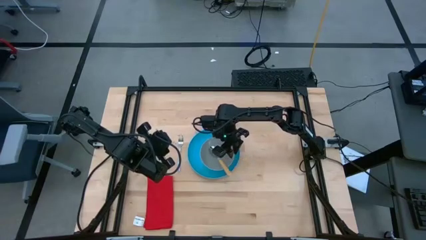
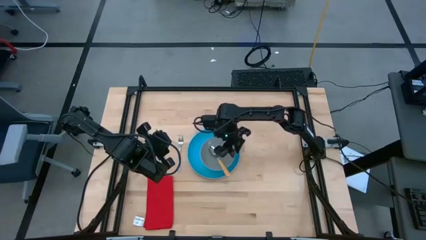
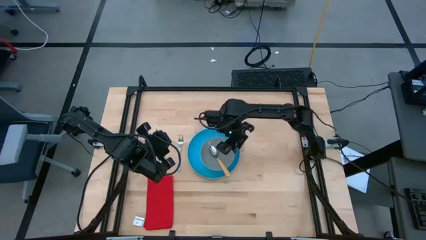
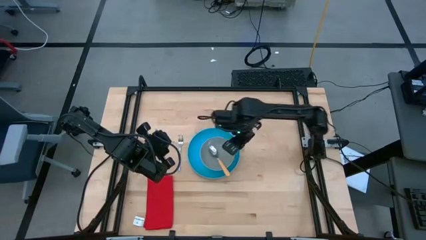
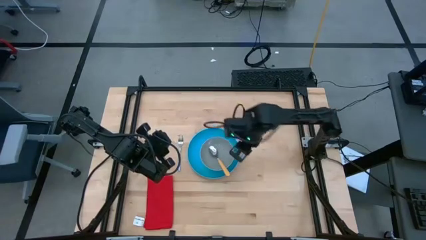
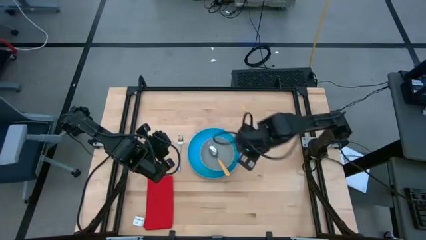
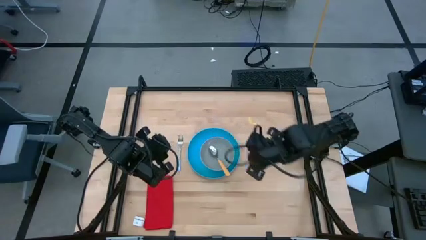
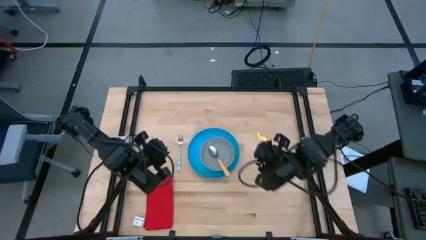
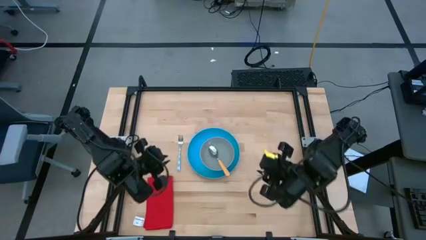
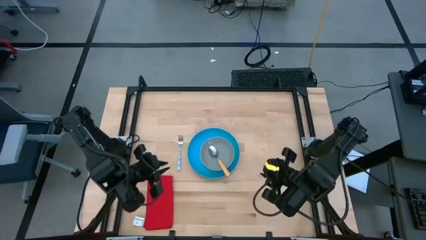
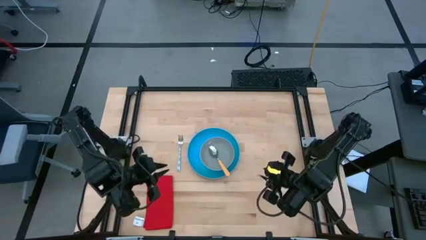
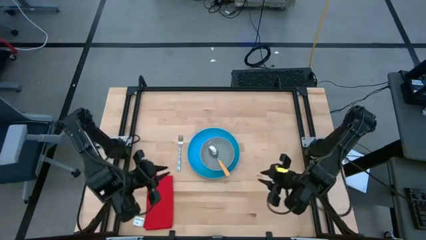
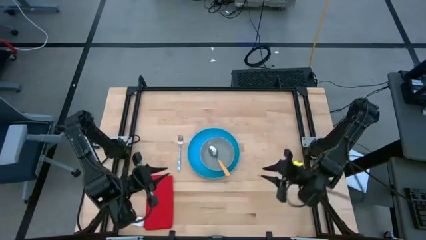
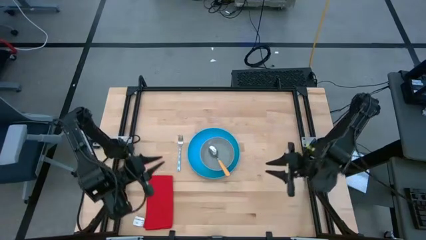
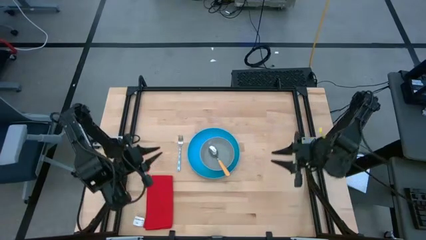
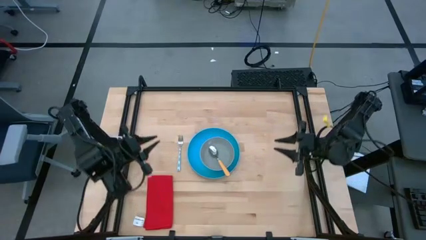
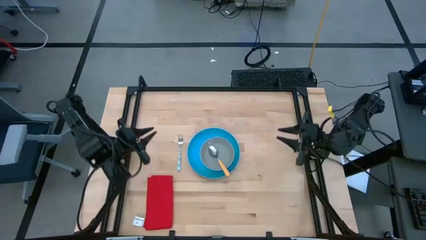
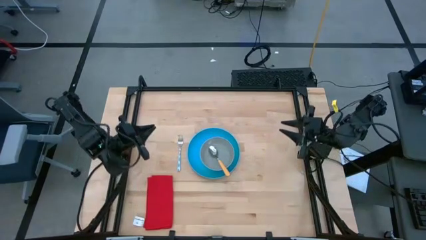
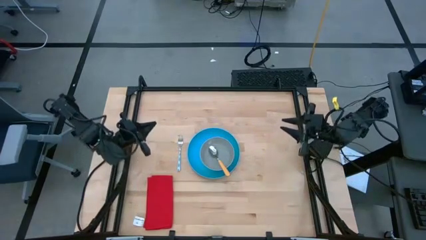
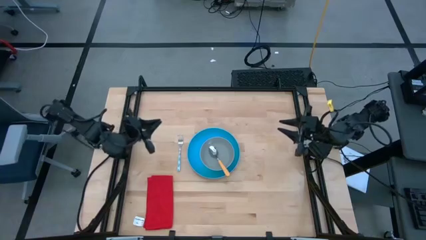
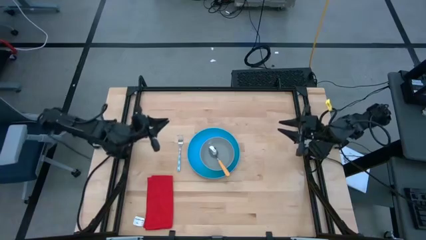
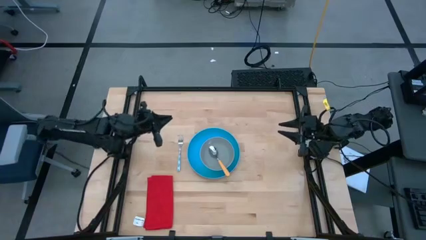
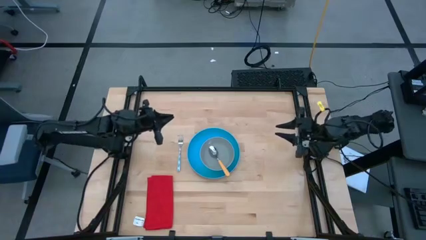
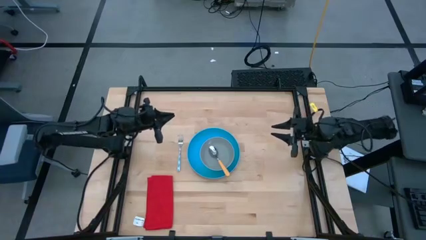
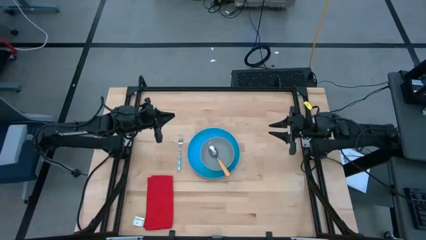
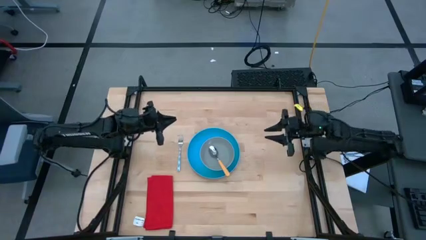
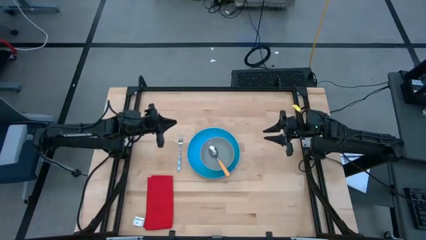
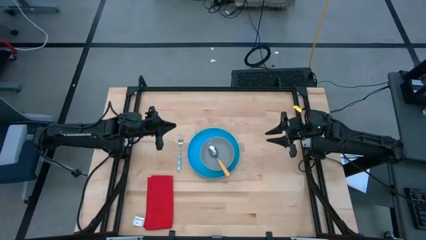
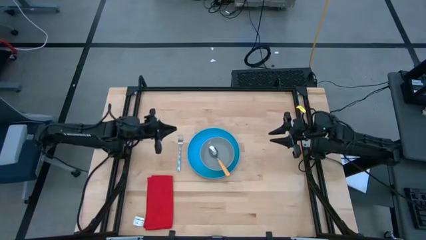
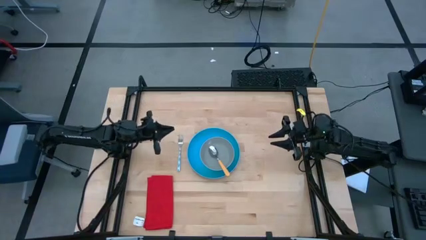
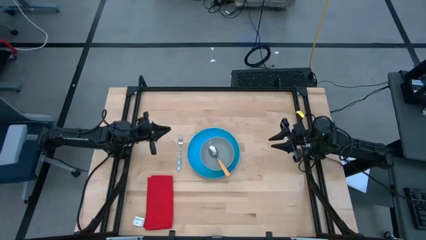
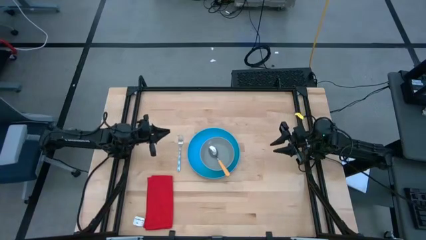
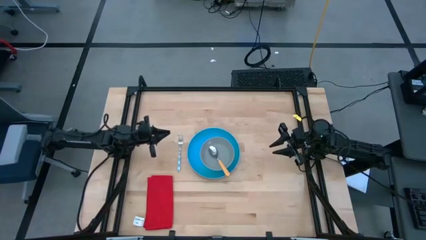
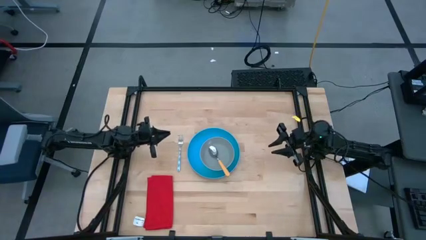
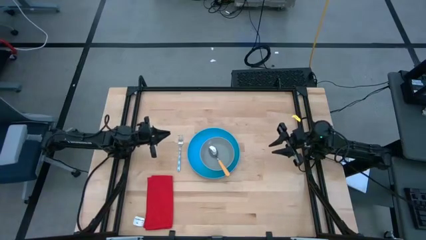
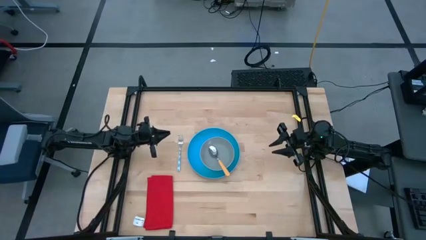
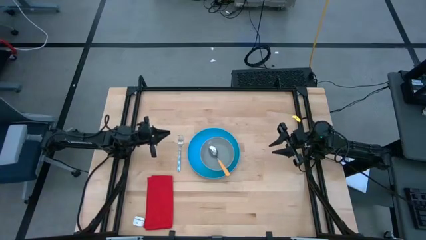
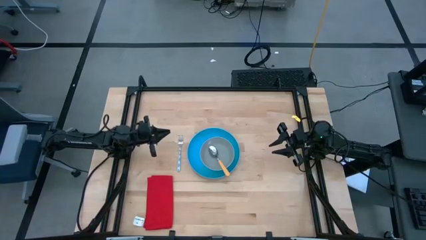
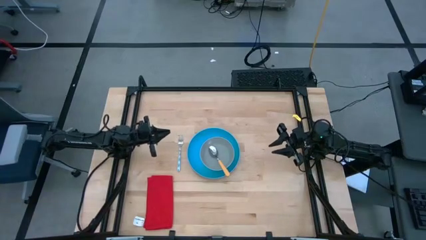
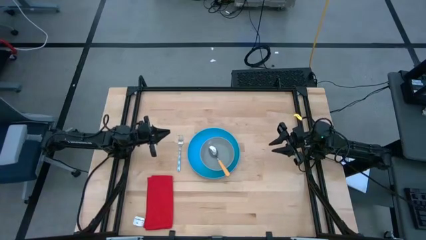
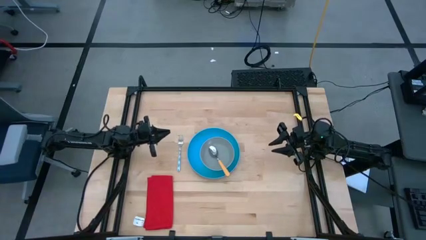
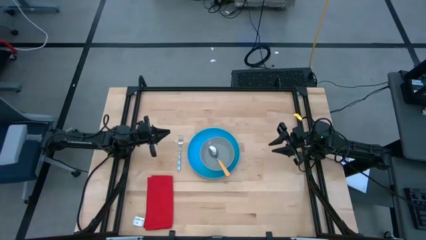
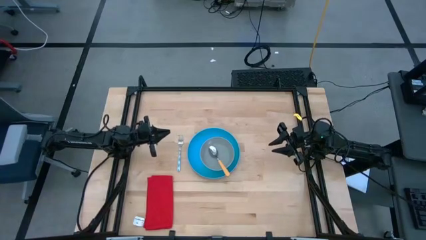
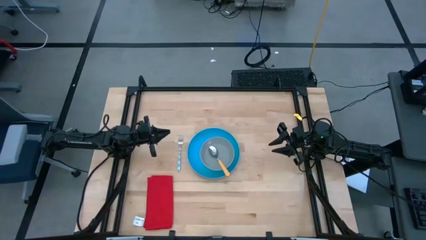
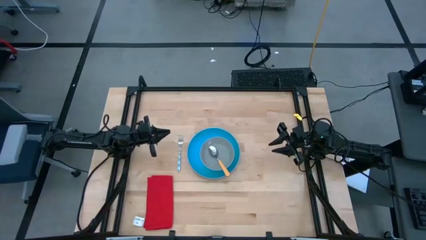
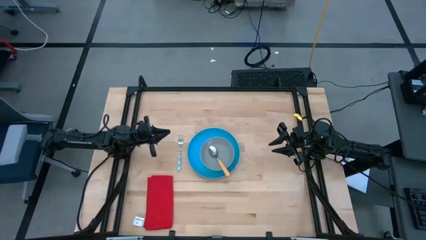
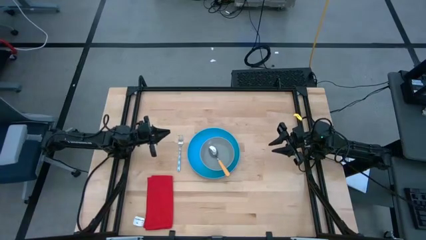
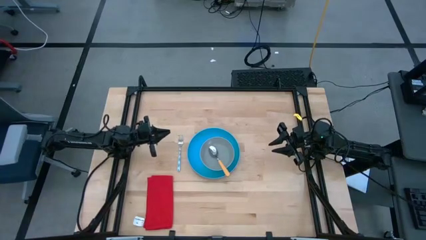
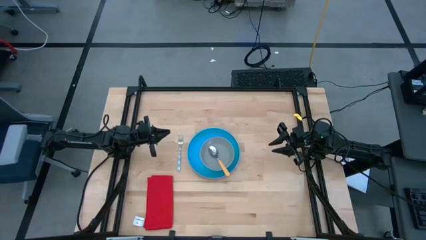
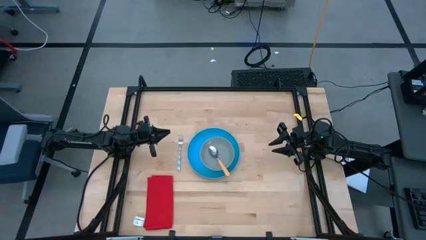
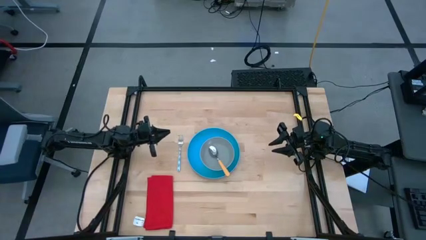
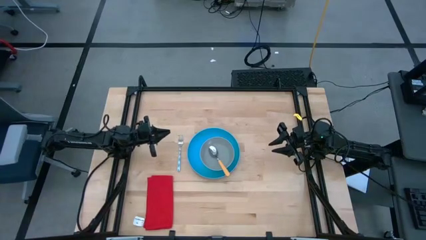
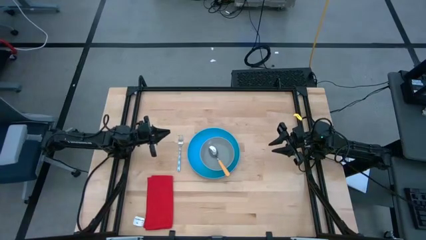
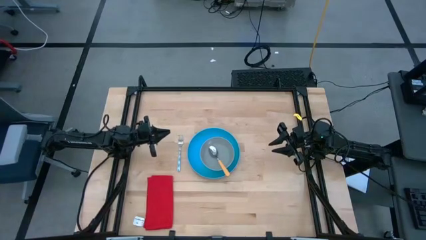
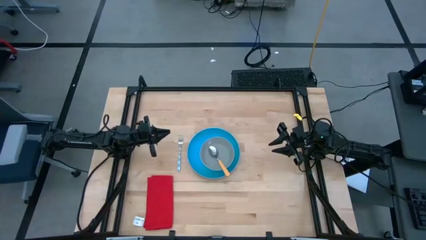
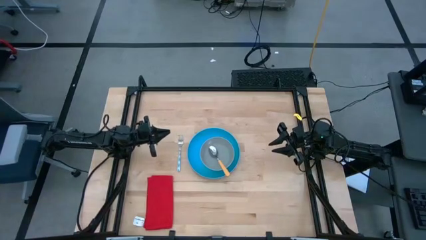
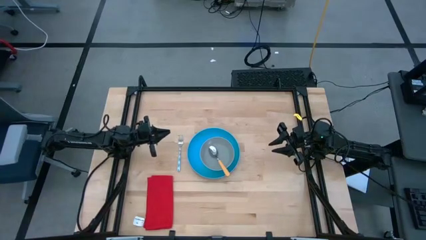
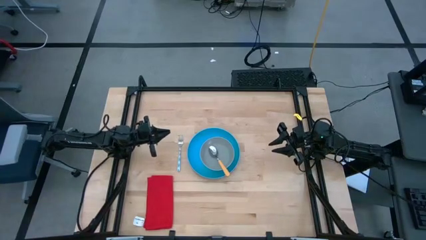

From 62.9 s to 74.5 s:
Task: Set table place
Return to Home Position
